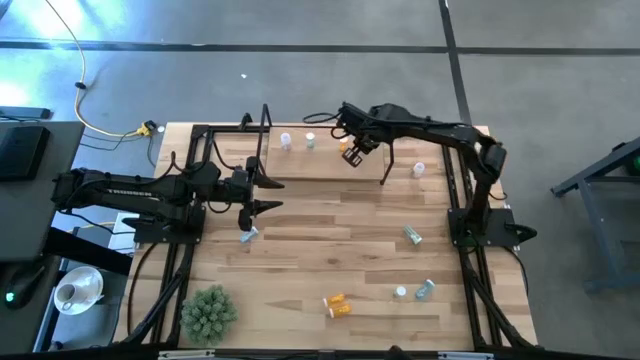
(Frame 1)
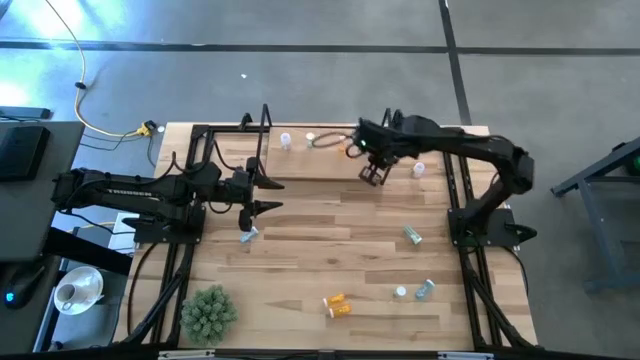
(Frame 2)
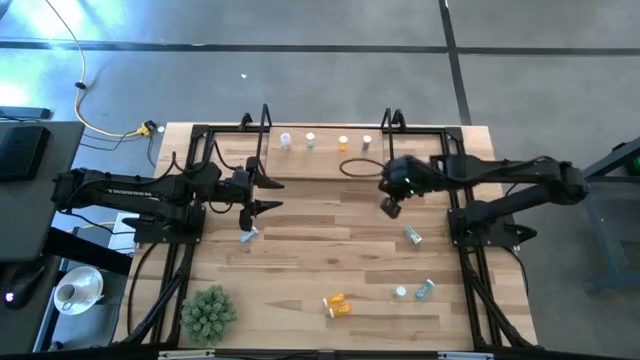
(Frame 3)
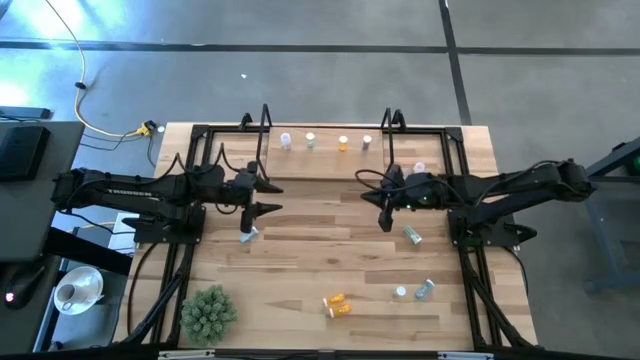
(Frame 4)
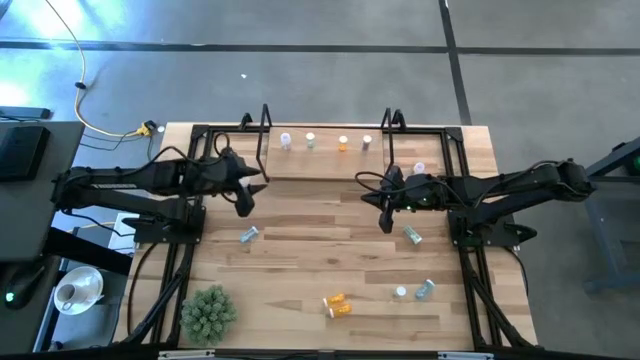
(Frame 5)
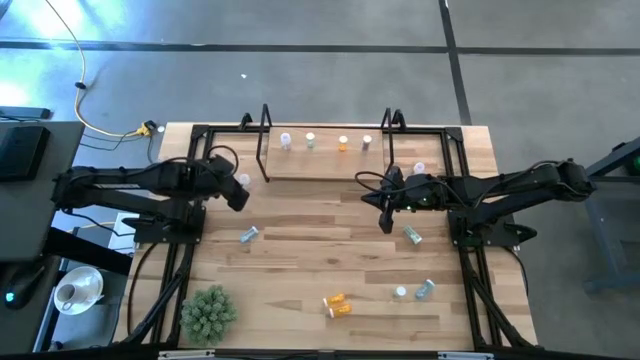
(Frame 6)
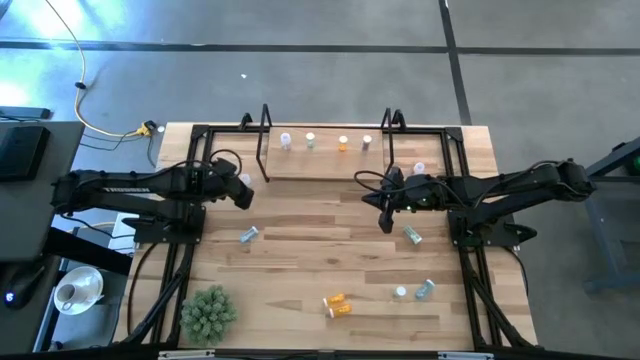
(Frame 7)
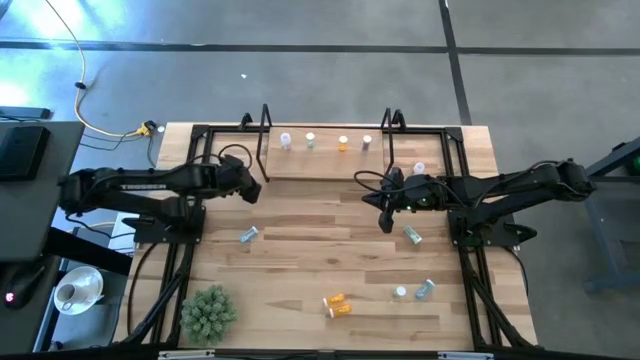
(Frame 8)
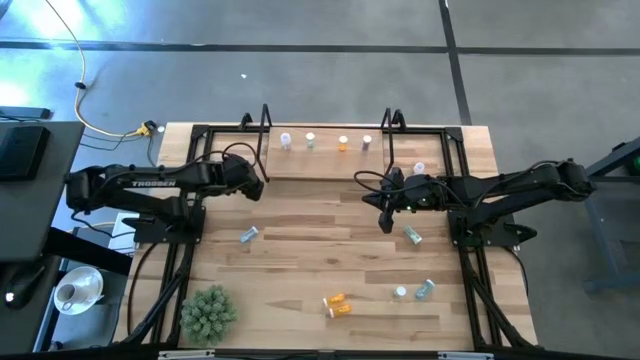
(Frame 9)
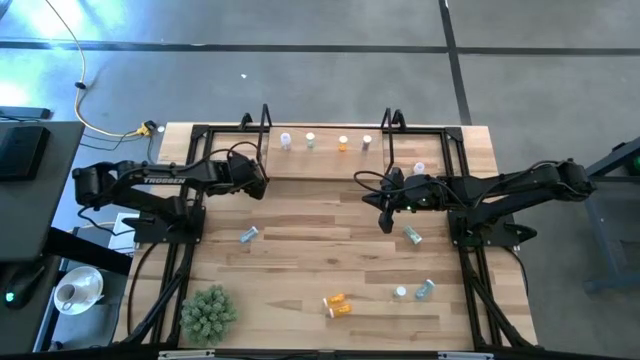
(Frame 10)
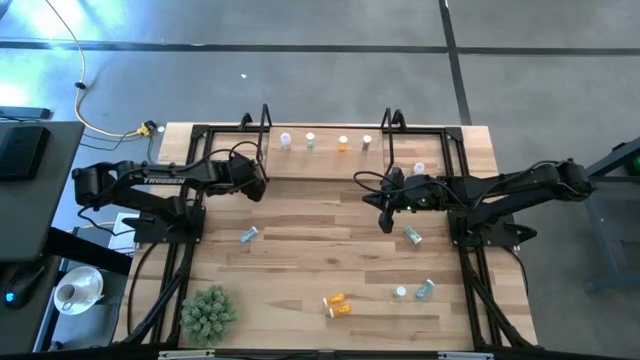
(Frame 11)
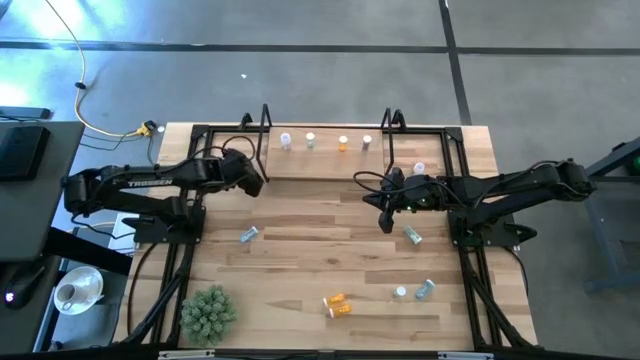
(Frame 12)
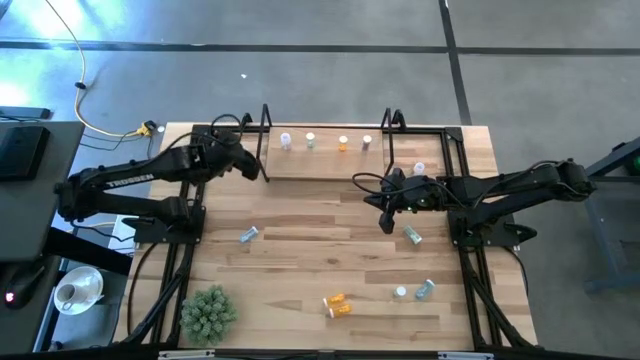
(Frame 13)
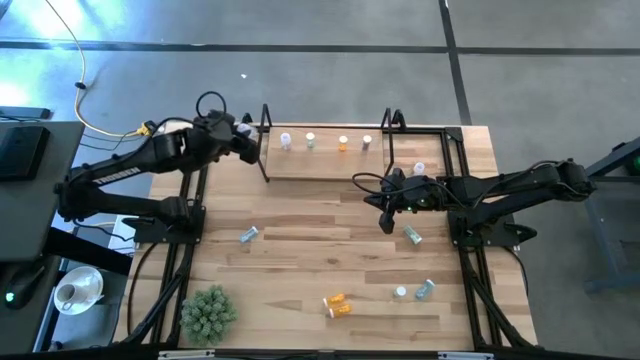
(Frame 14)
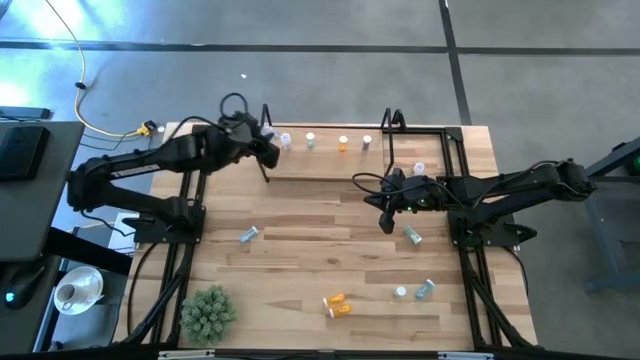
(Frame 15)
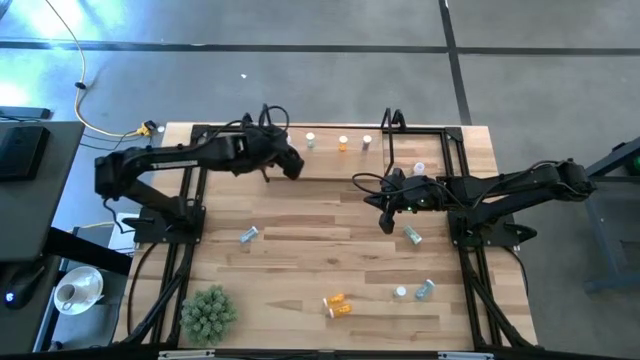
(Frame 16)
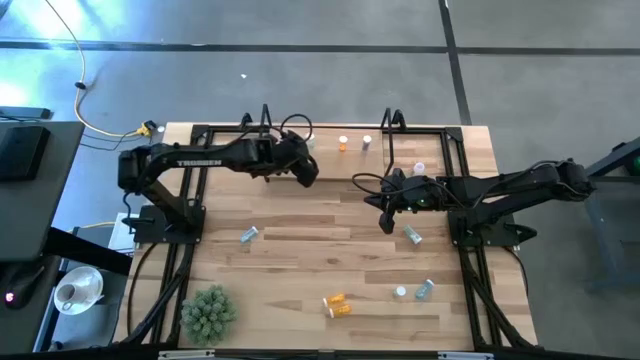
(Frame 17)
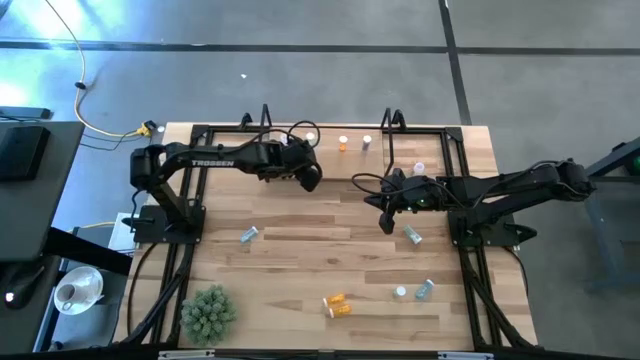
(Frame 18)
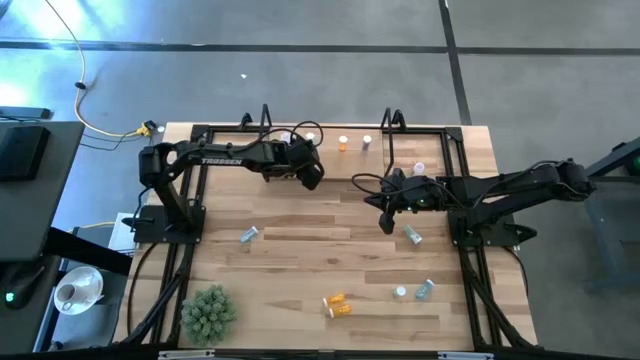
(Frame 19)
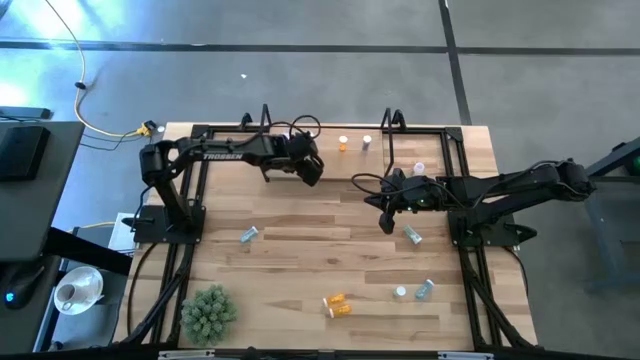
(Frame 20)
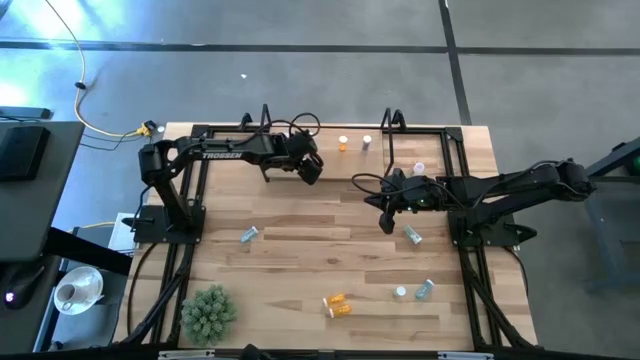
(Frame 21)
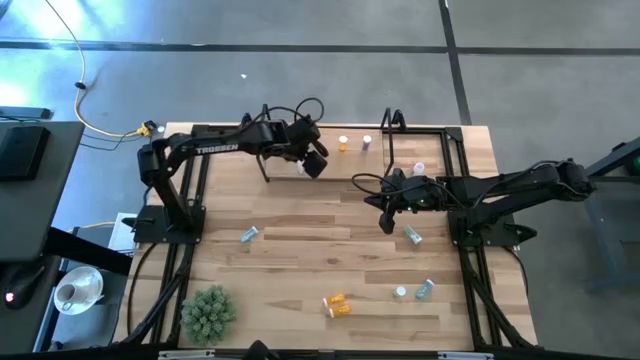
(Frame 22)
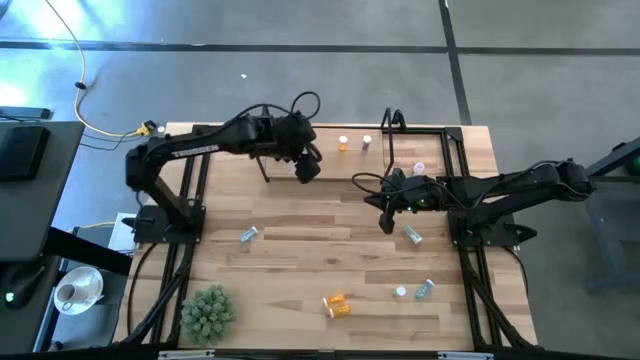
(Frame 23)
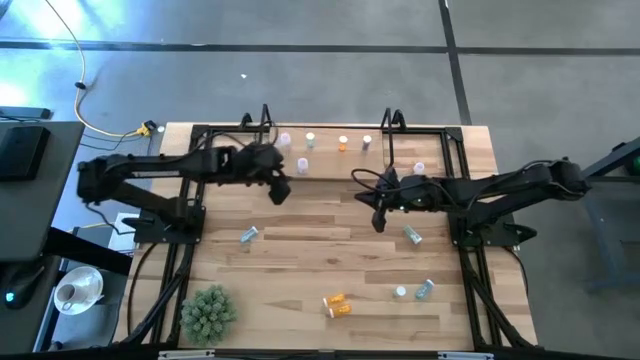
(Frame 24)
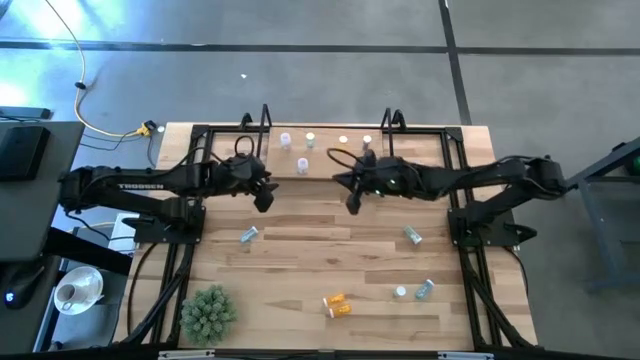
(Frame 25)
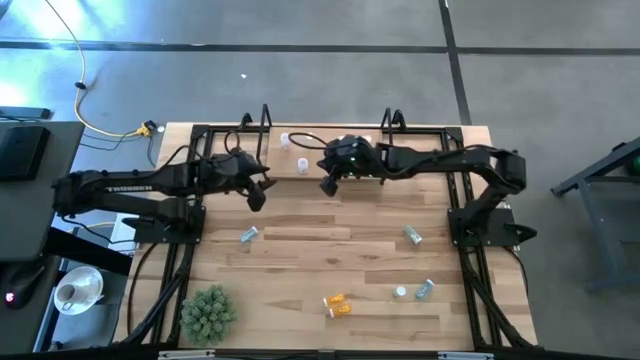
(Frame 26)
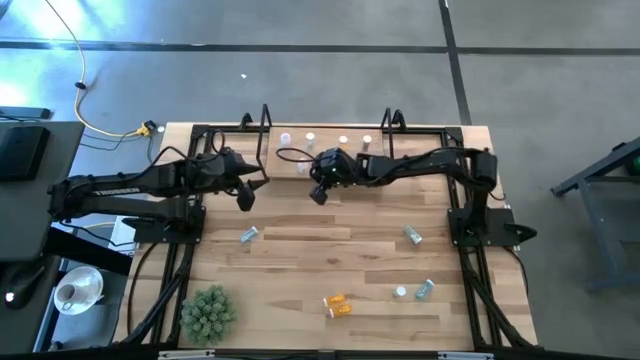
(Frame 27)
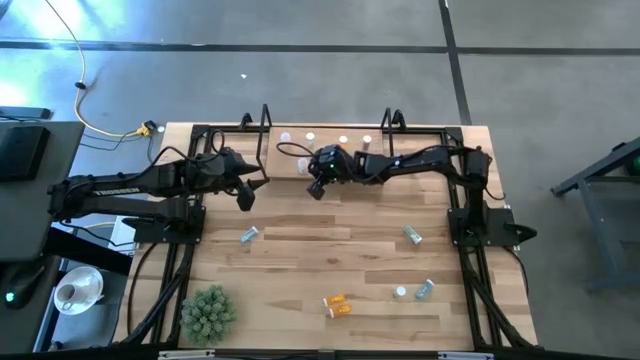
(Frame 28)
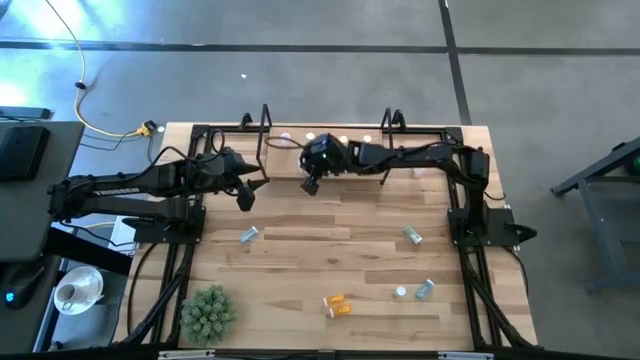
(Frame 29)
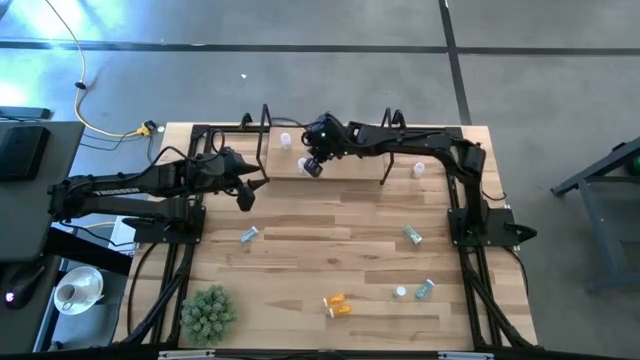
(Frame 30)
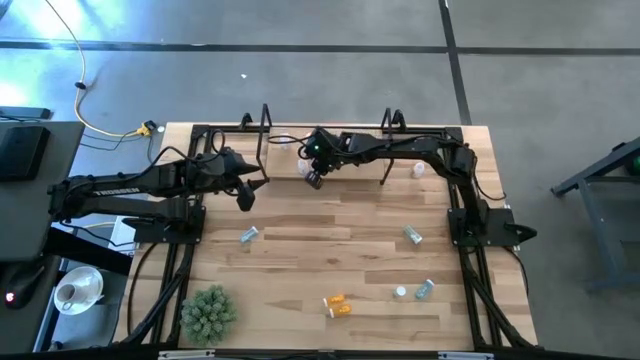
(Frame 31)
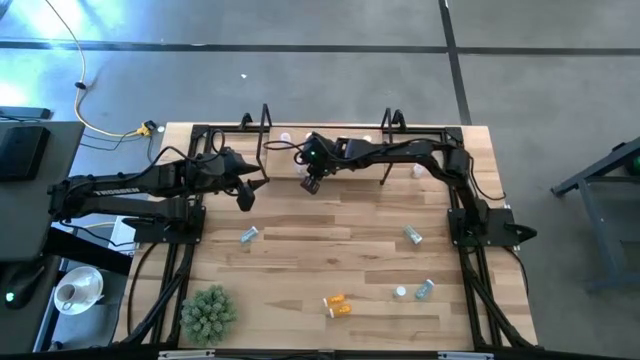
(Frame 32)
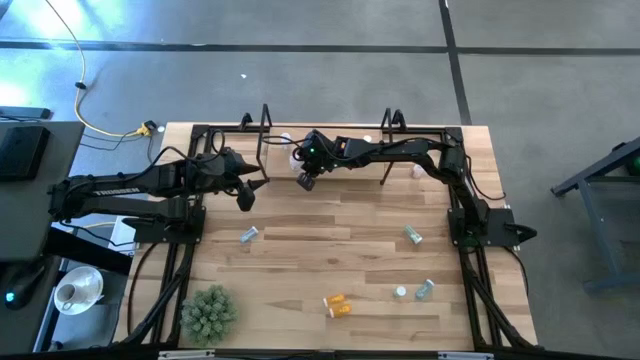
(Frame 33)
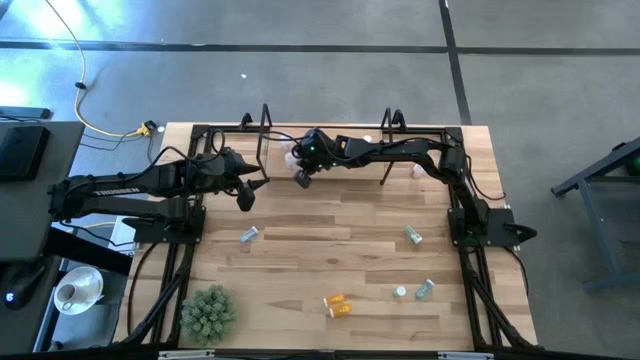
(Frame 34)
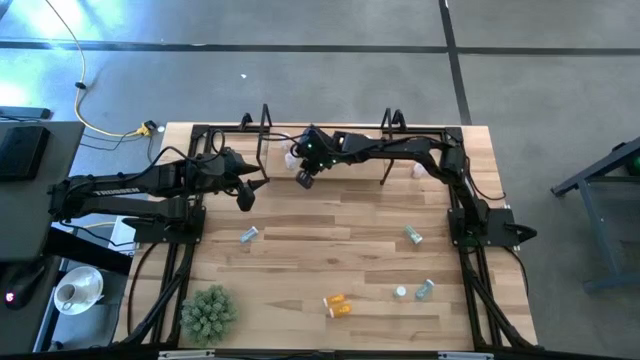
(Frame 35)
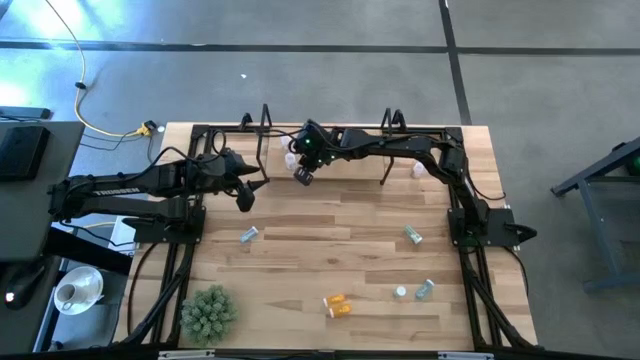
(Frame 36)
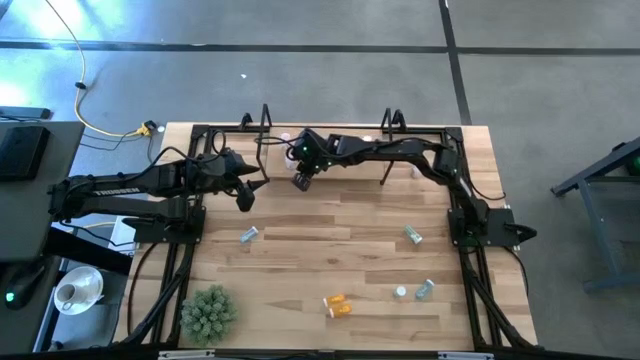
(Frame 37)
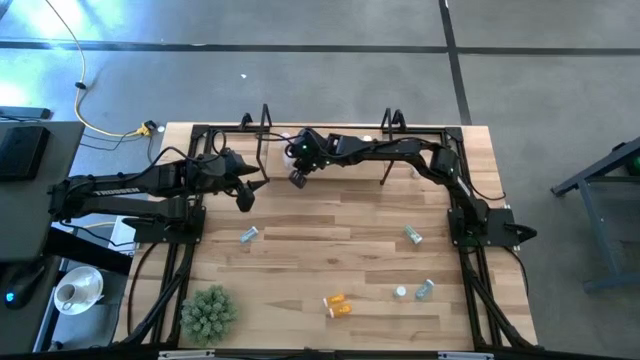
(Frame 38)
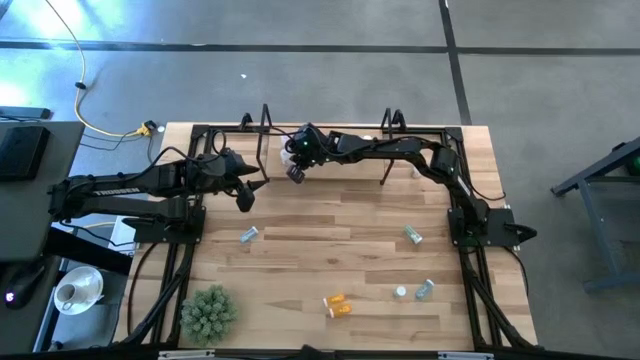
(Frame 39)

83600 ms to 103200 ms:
Task: Pick and place medicine bottles onto shelf by color
Put the left white pill bottle on the shelf aligned with the other white pill bottle

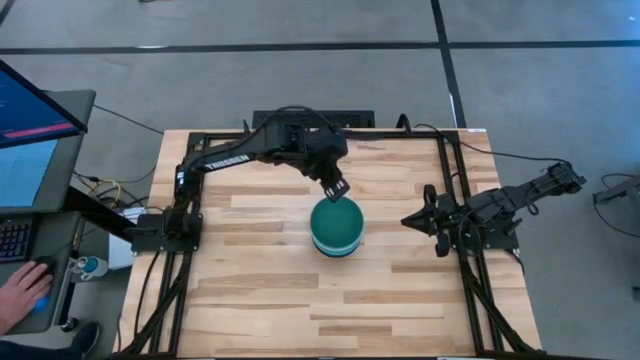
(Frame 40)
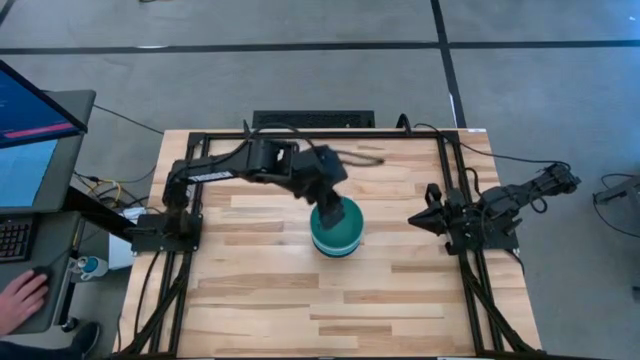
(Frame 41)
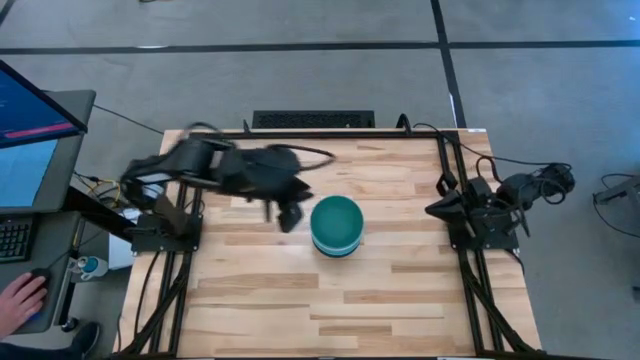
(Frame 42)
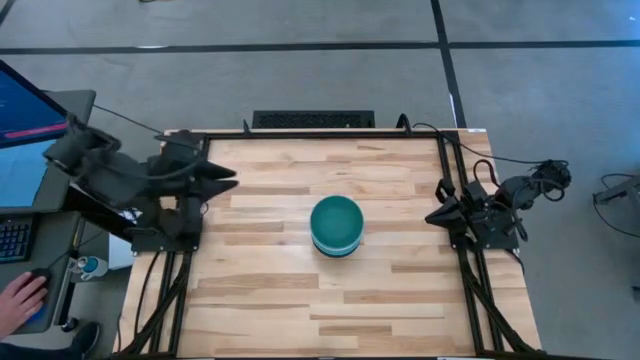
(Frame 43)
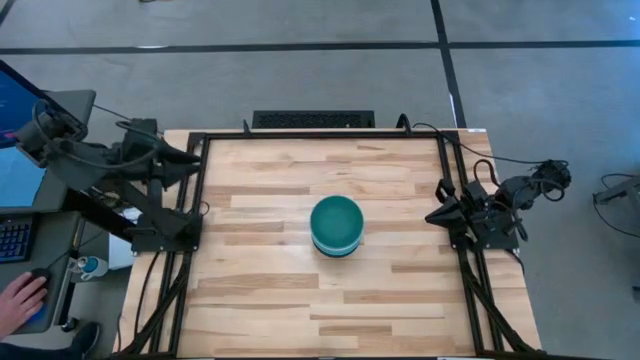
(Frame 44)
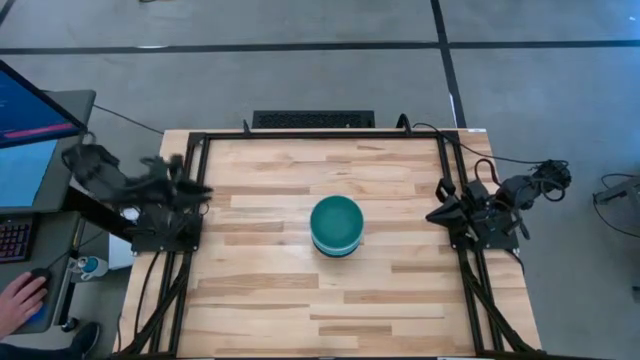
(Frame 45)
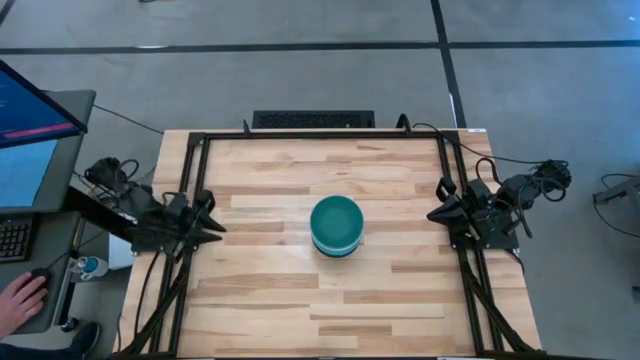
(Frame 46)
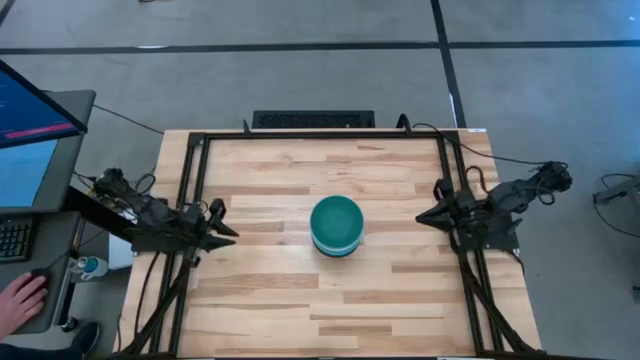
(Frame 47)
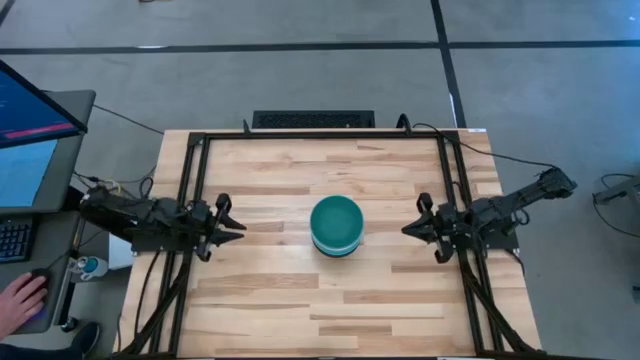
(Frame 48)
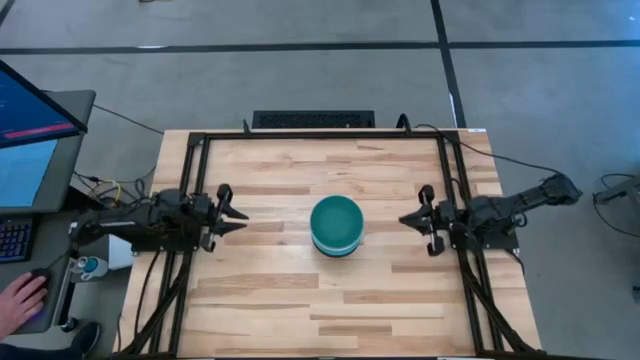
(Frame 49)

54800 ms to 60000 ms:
Task: Nest bowls inside each other
Return to Home Position
